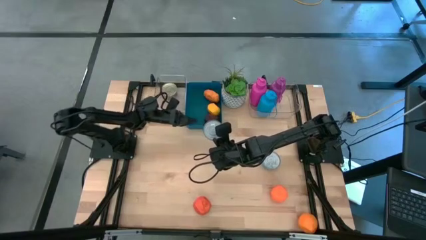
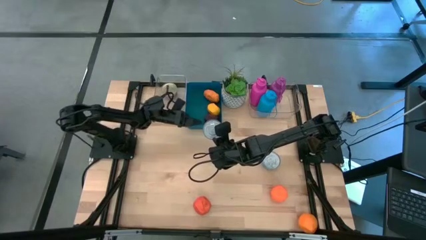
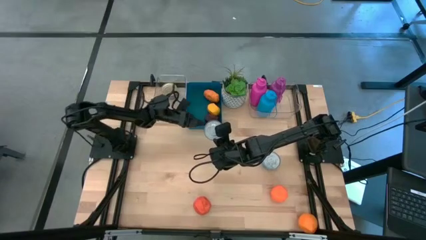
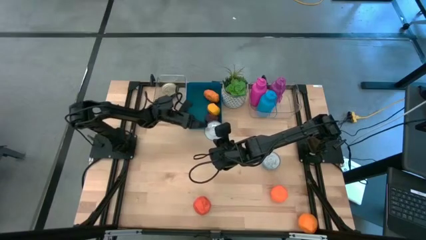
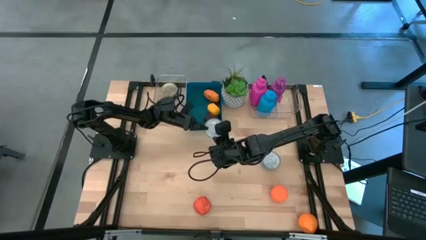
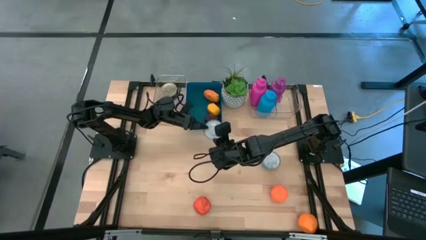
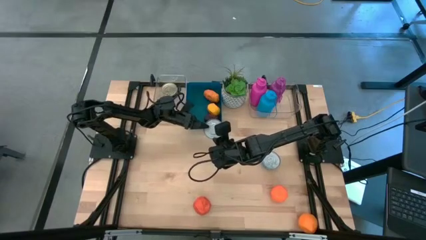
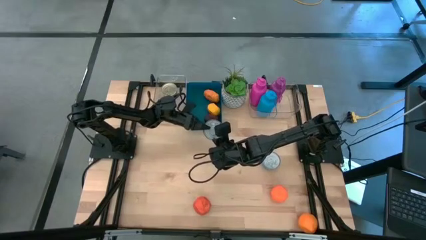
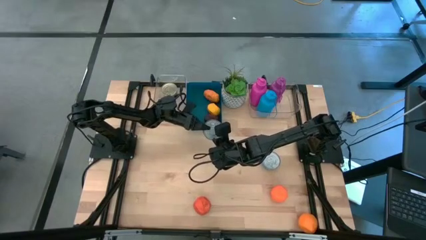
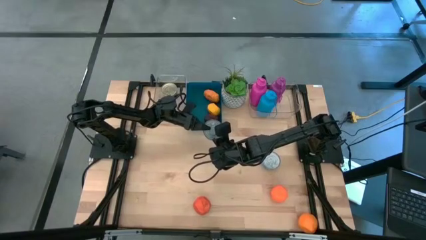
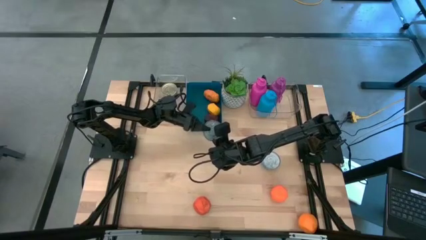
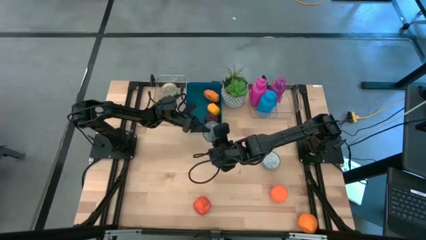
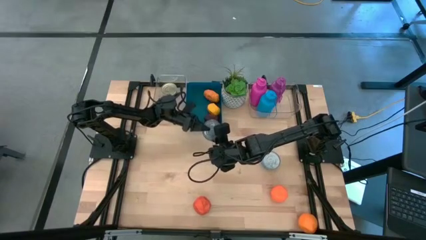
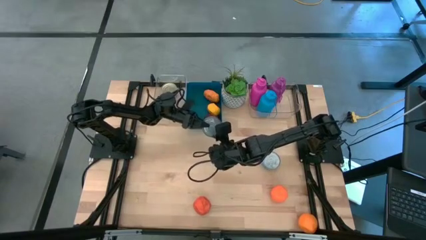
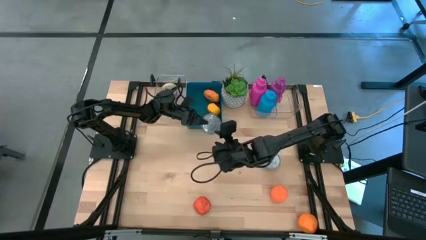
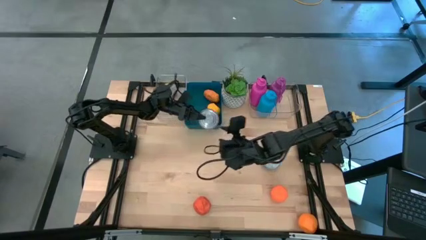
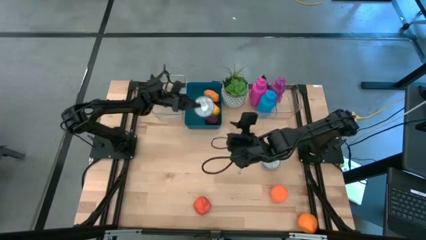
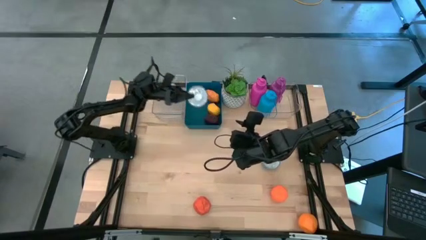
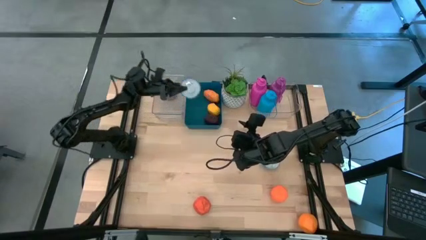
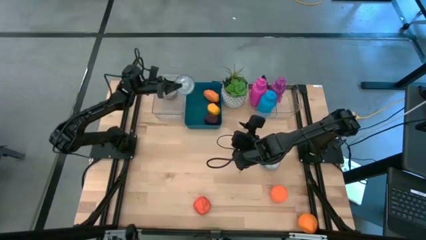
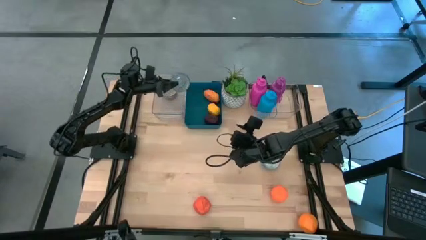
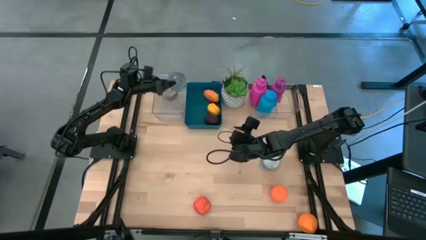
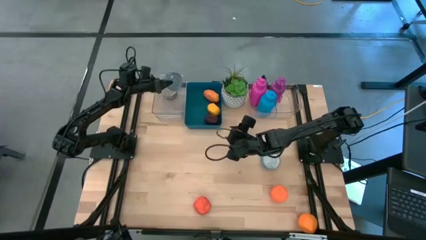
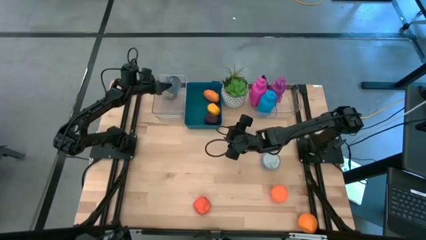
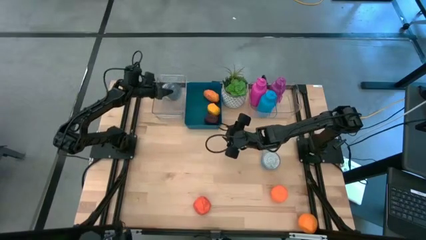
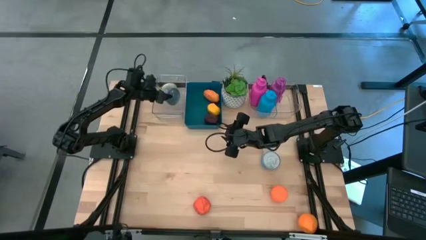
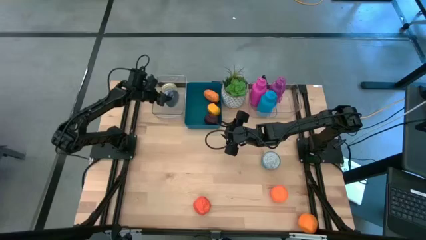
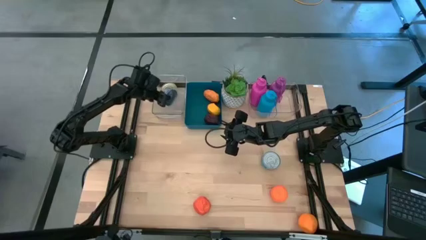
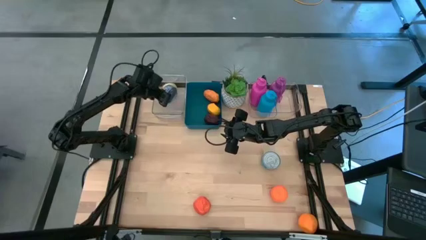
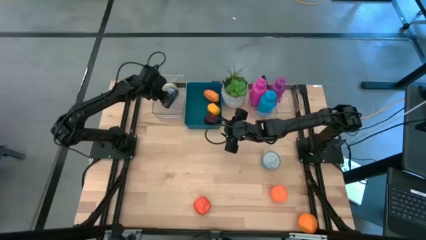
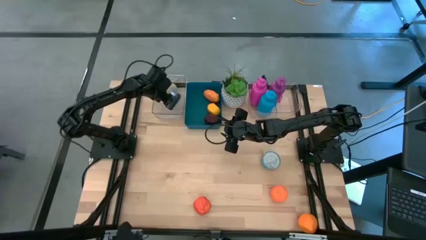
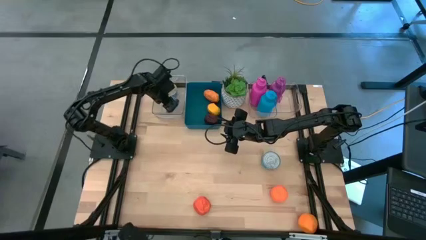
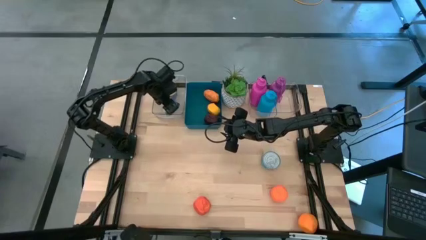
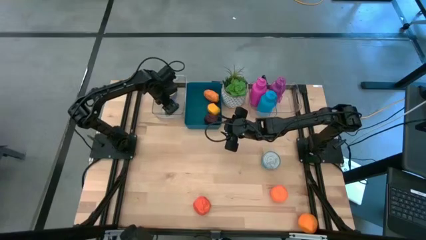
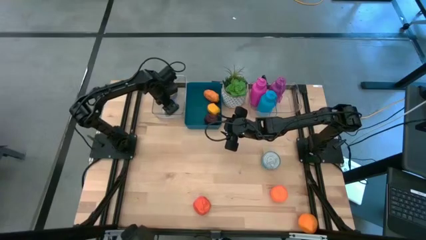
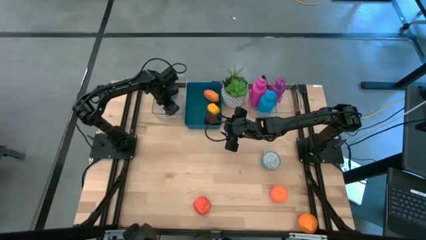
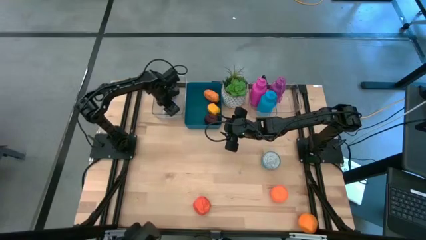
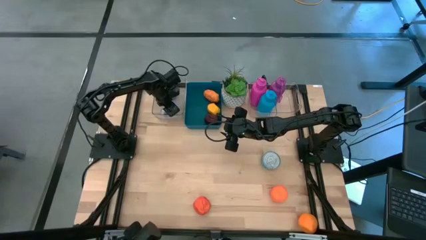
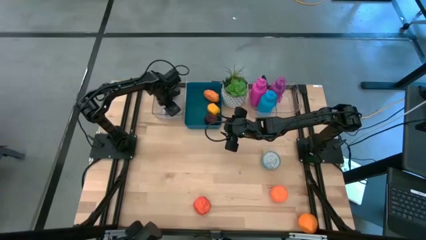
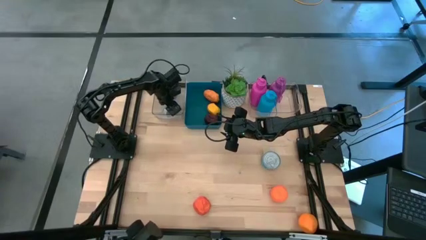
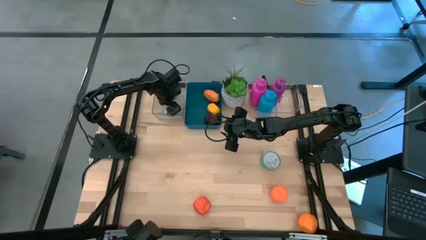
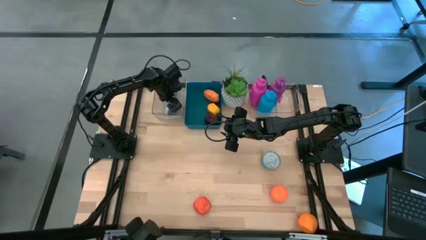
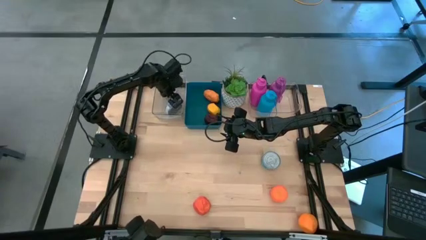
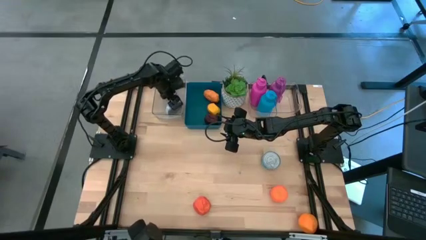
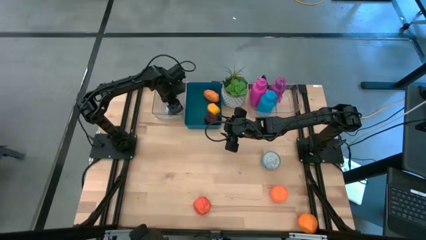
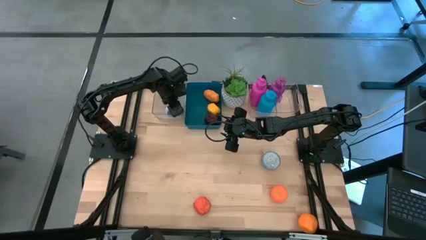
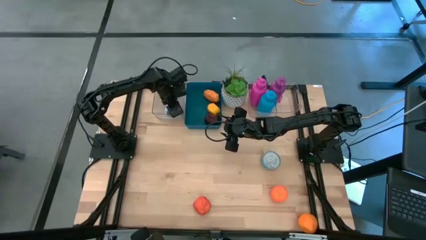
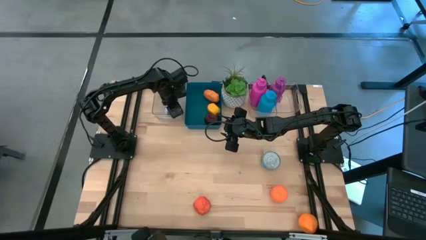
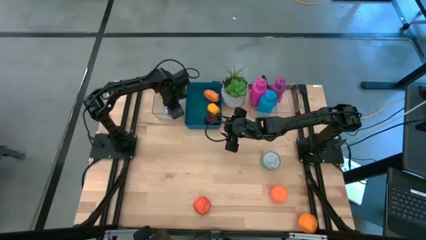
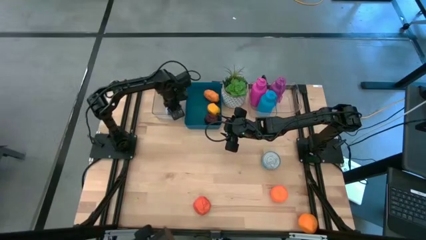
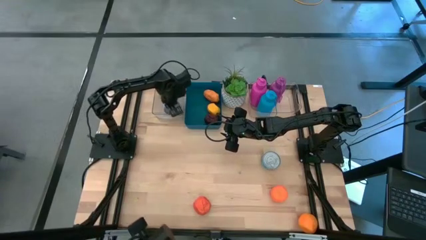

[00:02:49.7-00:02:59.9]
Task: Pick & Place Food Item
Put the blue tuna can into the left transparent bin

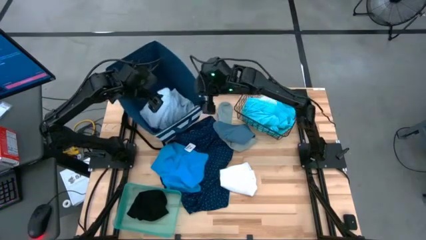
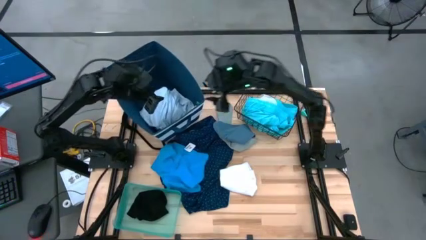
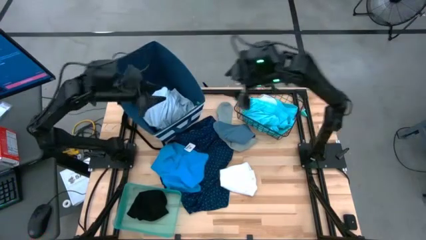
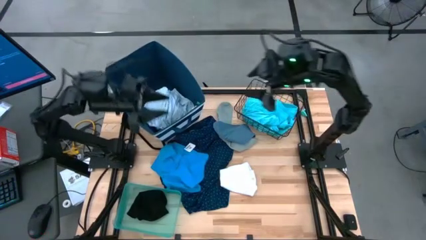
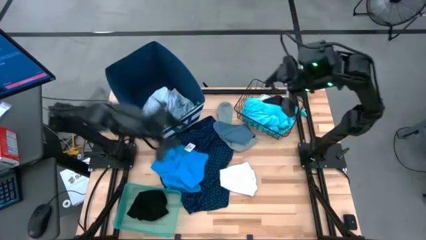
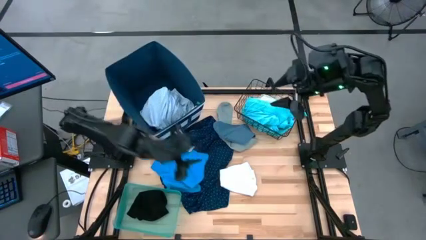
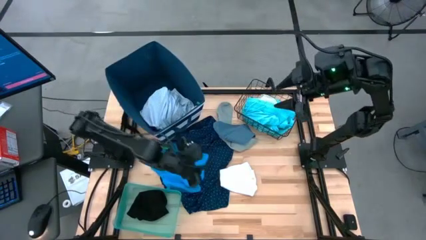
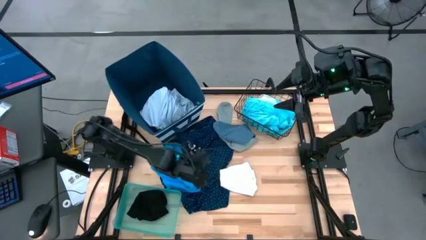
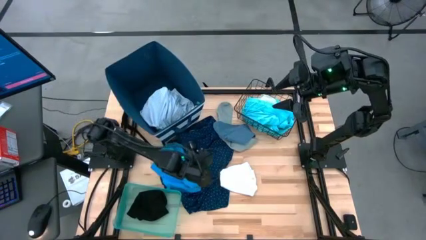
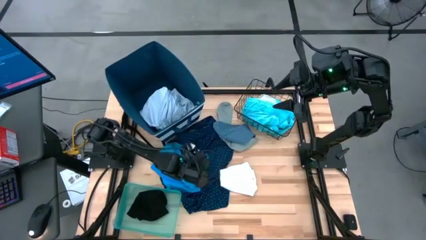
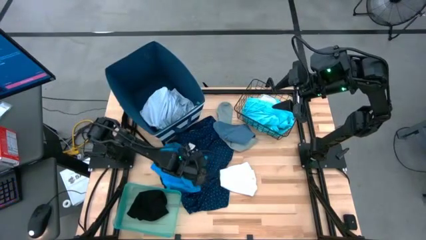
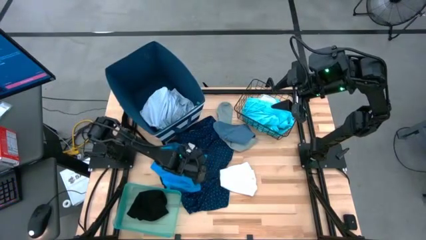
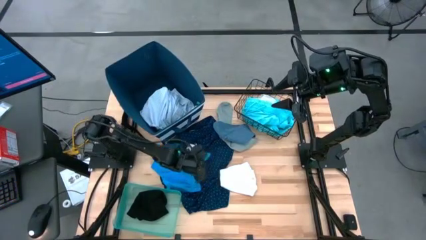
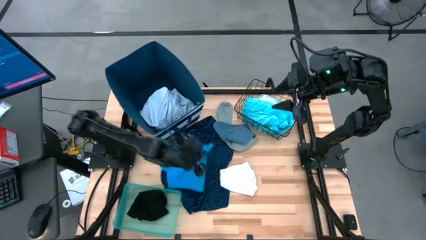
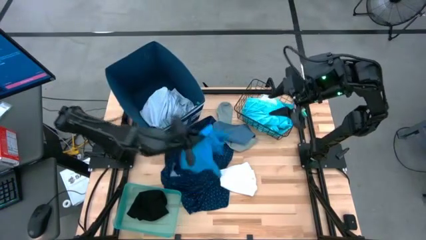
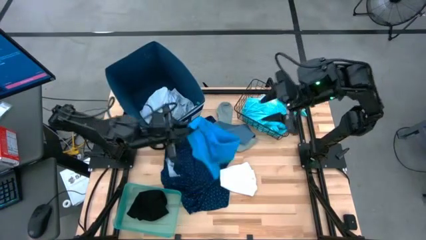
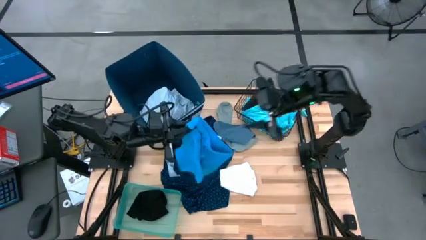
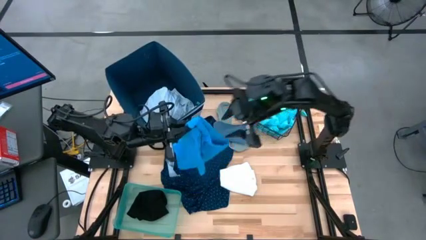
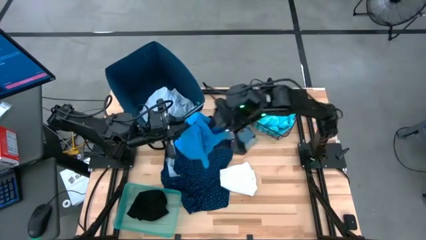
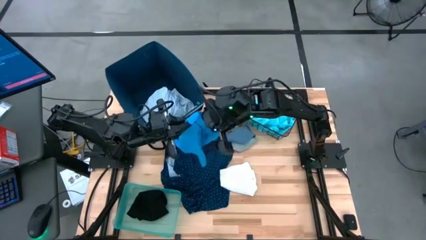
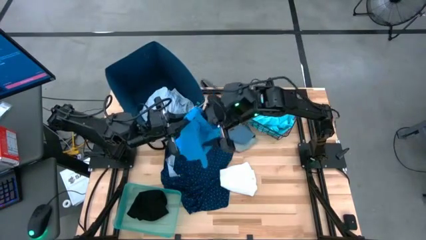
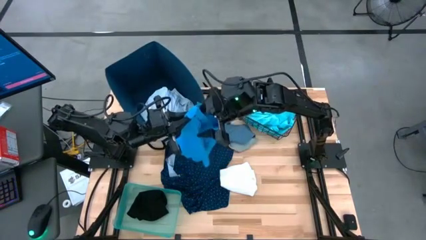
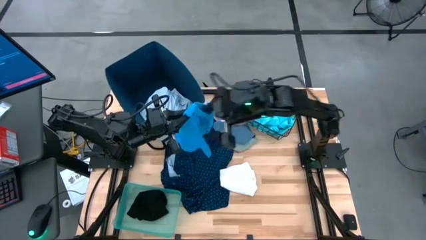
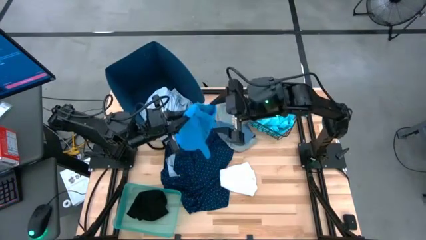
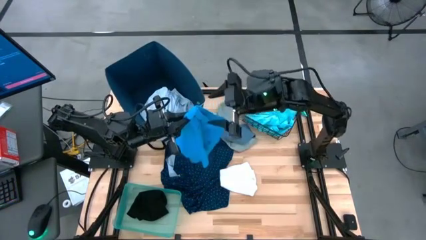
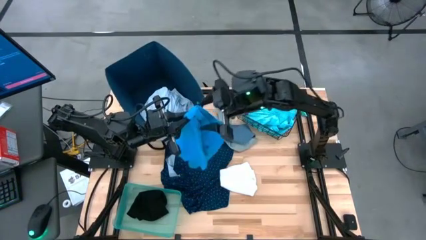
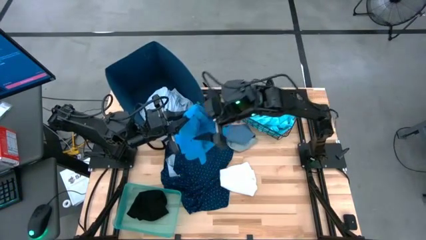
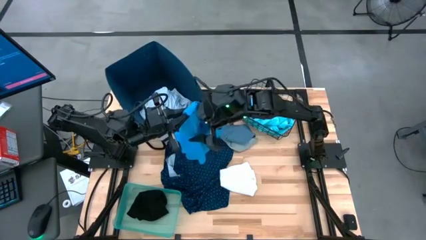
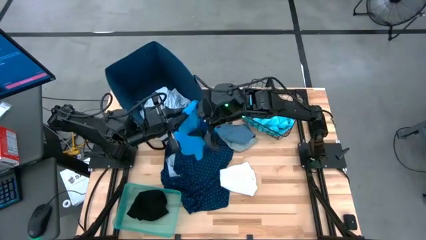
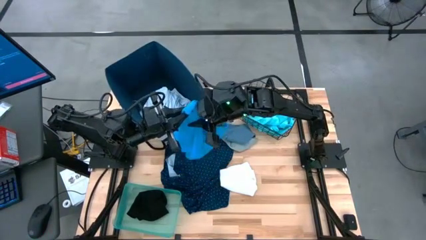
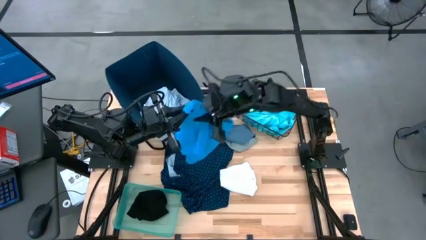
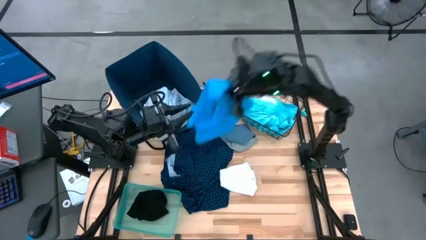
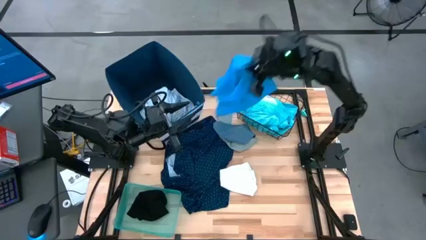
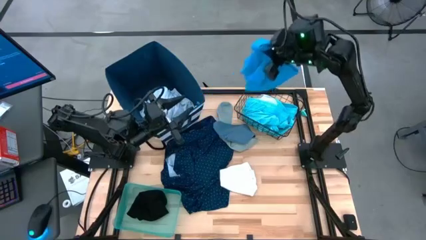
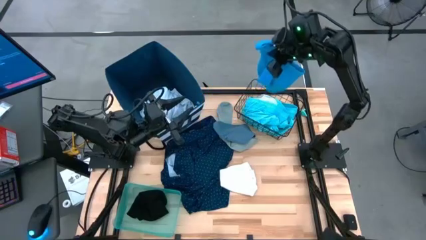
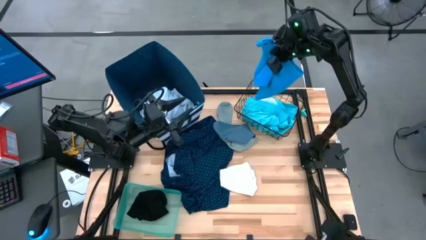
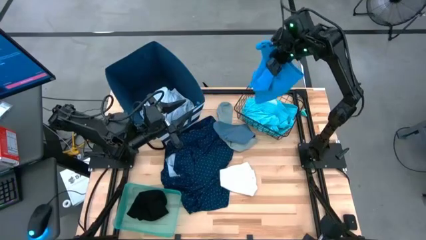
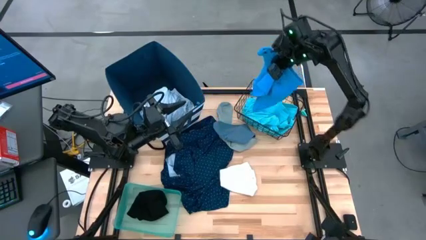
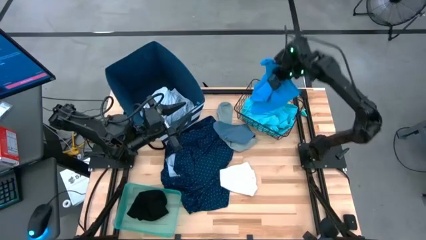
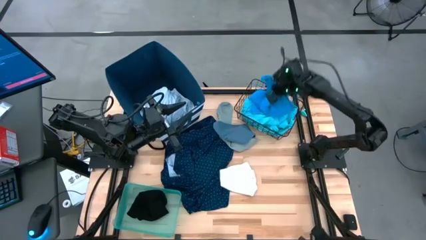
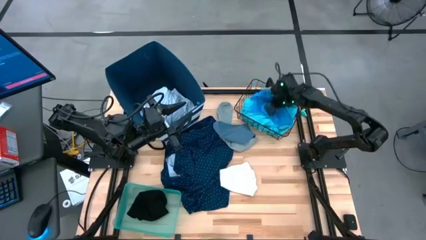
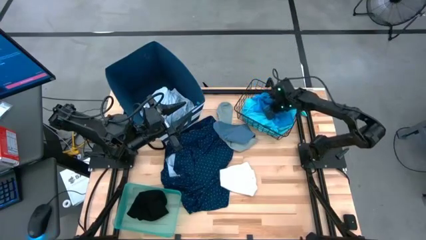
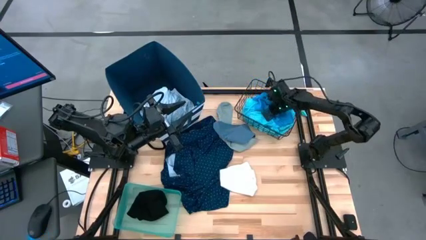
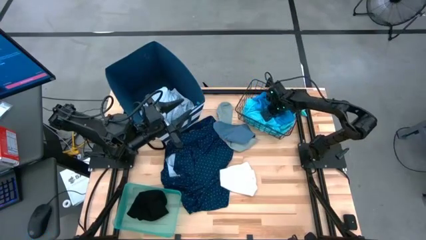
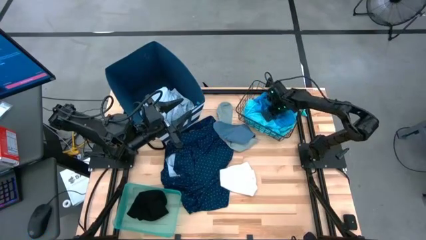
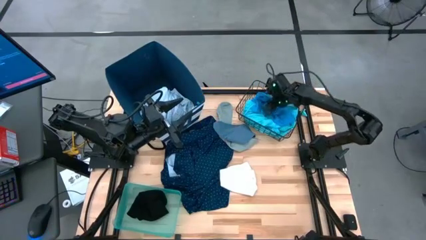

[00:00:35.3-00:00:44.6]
Task: Pick & Place Cloths
Put the blue shorts into the black wire basket
